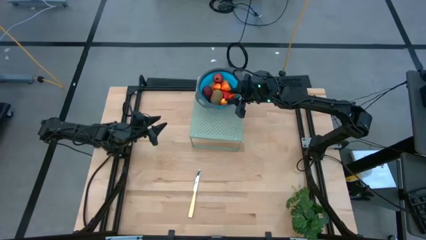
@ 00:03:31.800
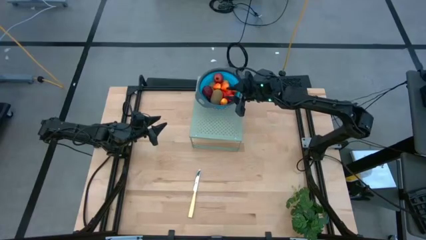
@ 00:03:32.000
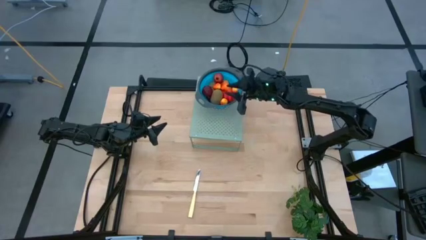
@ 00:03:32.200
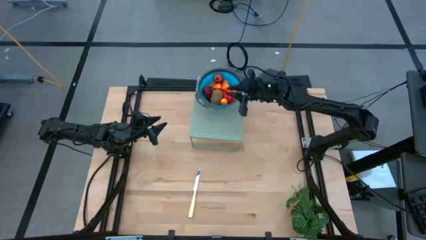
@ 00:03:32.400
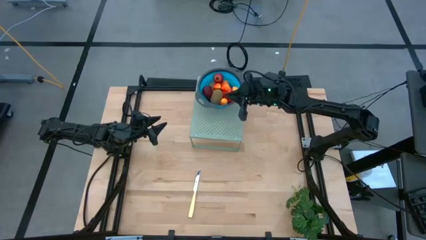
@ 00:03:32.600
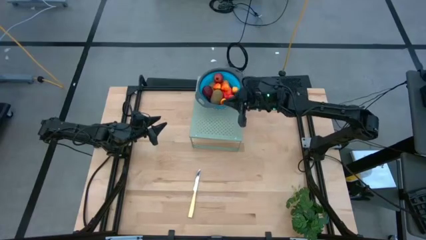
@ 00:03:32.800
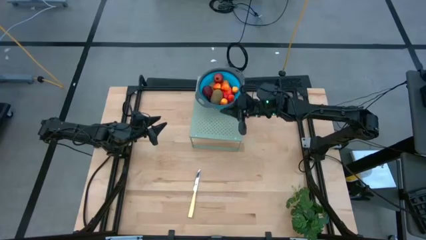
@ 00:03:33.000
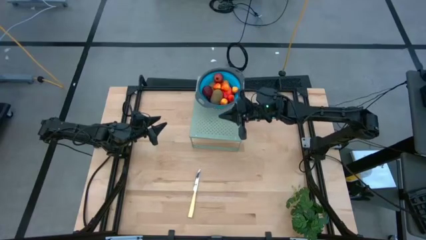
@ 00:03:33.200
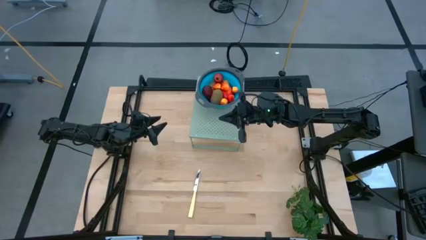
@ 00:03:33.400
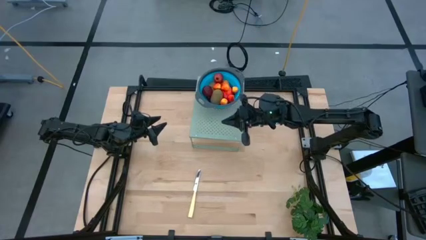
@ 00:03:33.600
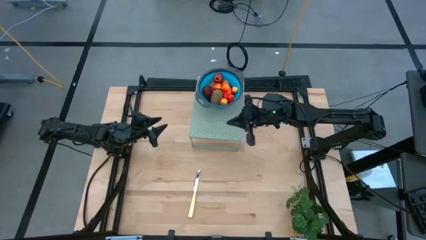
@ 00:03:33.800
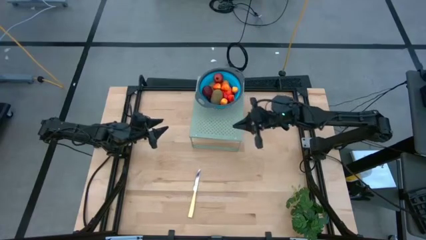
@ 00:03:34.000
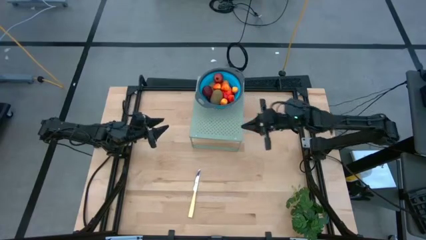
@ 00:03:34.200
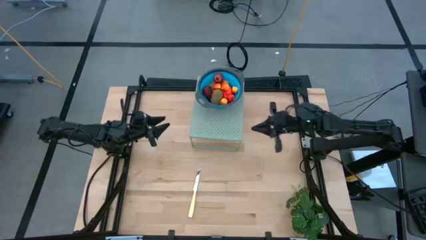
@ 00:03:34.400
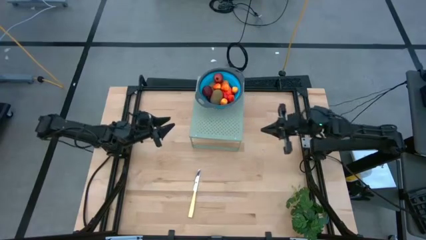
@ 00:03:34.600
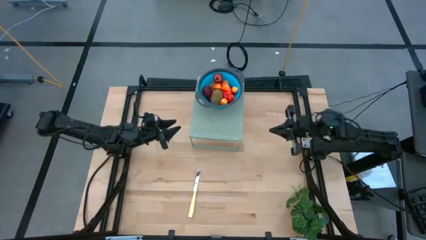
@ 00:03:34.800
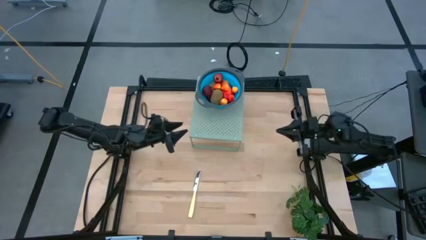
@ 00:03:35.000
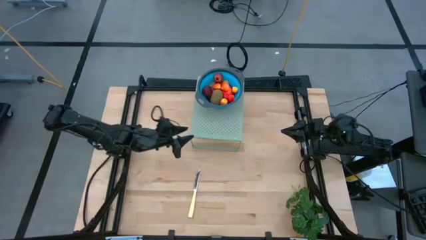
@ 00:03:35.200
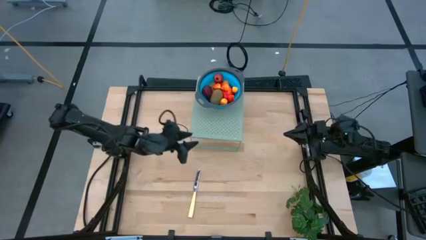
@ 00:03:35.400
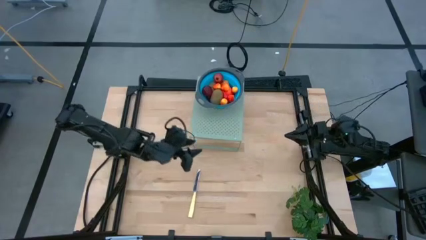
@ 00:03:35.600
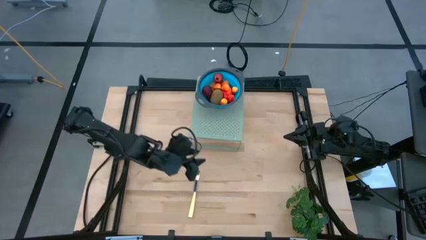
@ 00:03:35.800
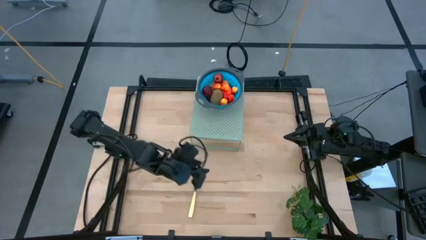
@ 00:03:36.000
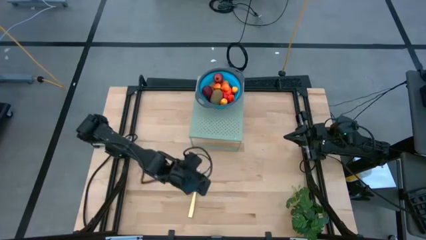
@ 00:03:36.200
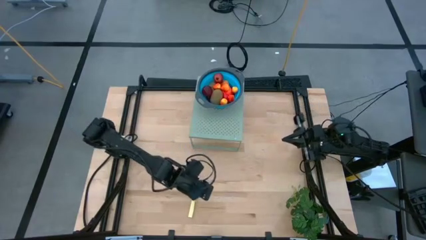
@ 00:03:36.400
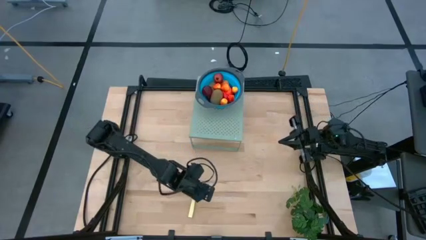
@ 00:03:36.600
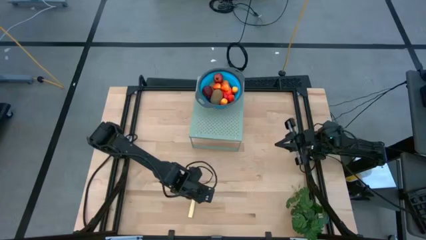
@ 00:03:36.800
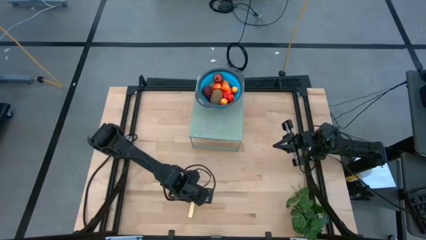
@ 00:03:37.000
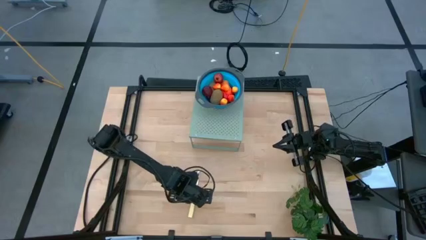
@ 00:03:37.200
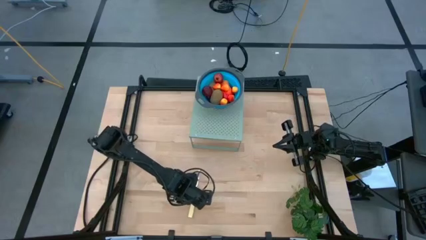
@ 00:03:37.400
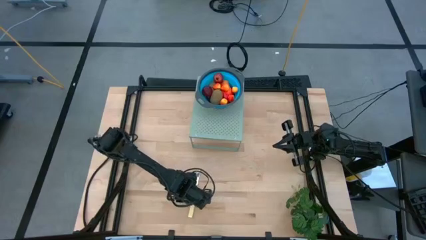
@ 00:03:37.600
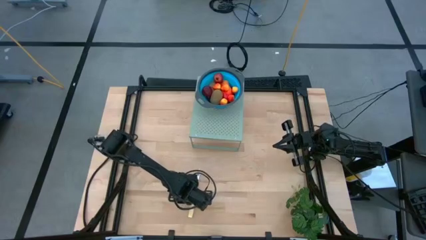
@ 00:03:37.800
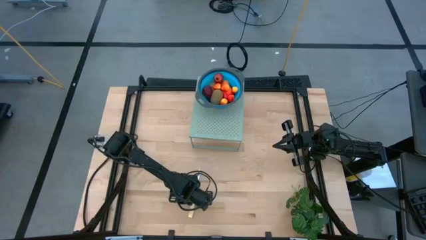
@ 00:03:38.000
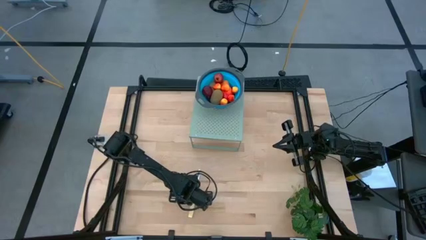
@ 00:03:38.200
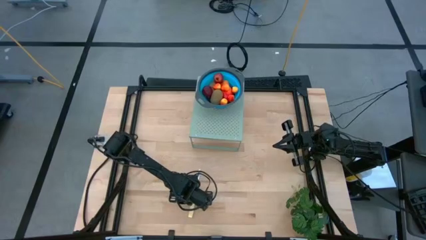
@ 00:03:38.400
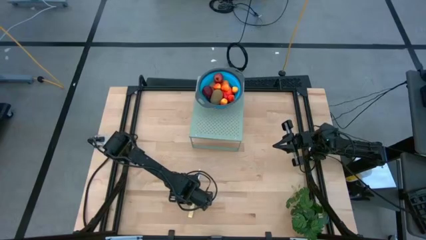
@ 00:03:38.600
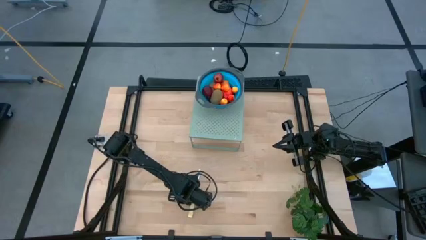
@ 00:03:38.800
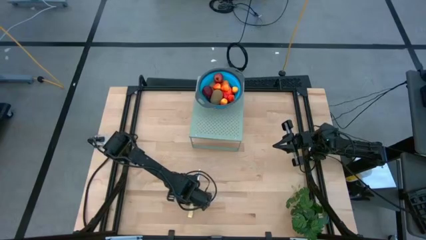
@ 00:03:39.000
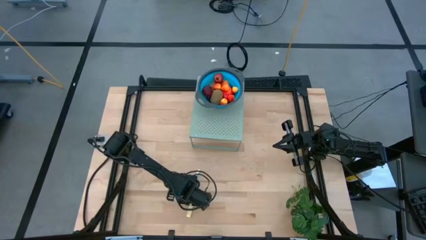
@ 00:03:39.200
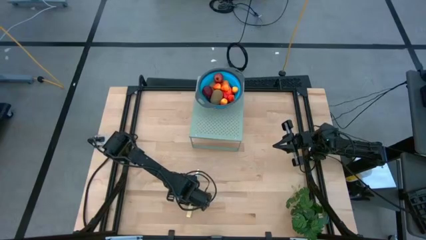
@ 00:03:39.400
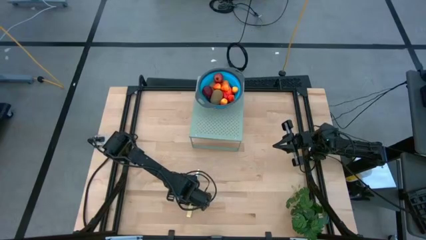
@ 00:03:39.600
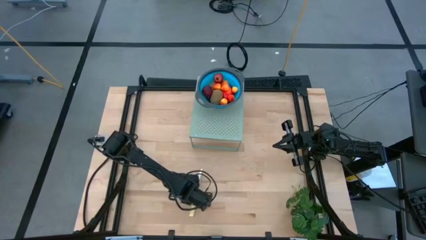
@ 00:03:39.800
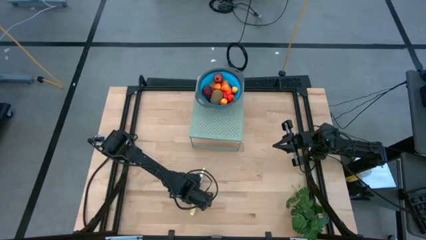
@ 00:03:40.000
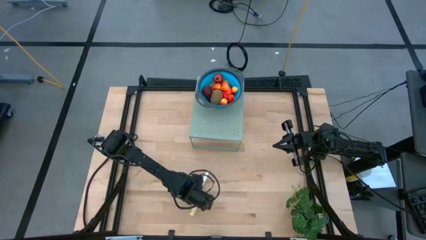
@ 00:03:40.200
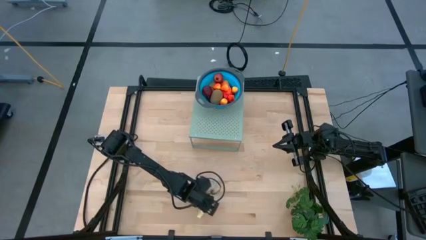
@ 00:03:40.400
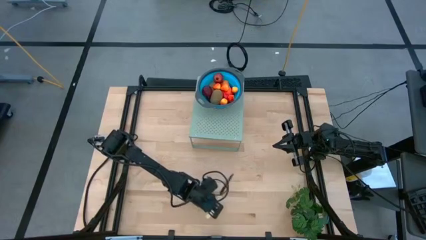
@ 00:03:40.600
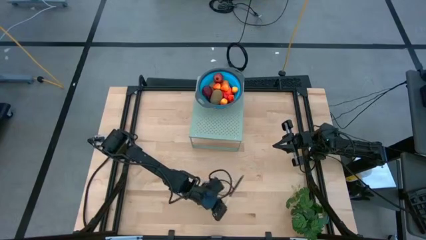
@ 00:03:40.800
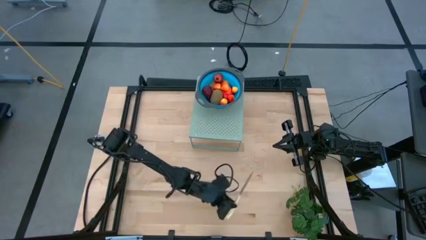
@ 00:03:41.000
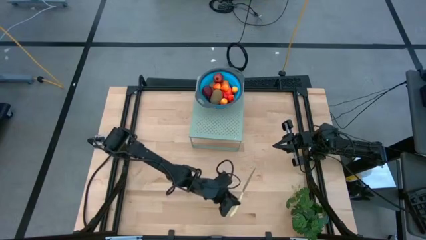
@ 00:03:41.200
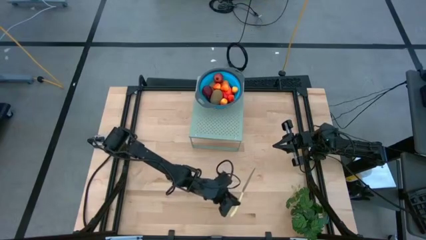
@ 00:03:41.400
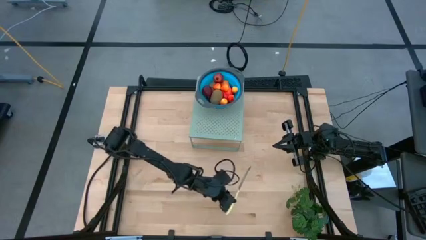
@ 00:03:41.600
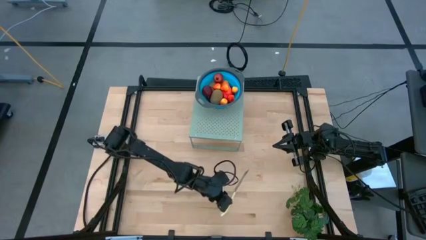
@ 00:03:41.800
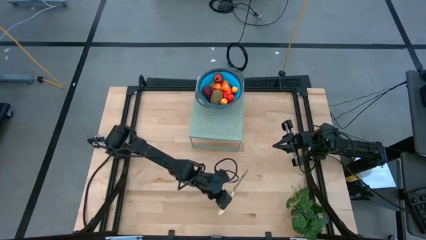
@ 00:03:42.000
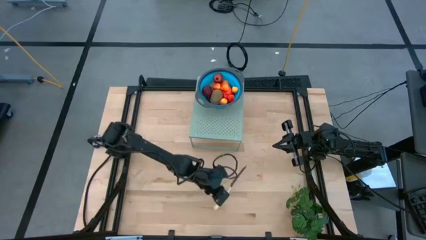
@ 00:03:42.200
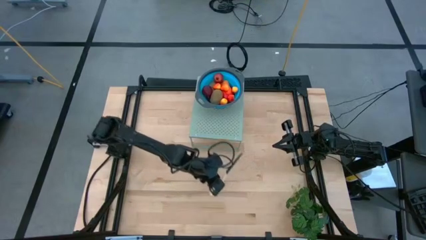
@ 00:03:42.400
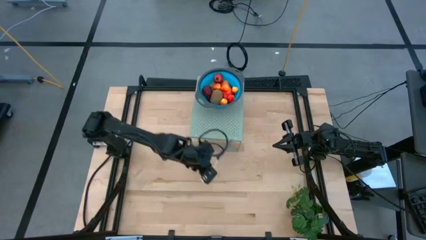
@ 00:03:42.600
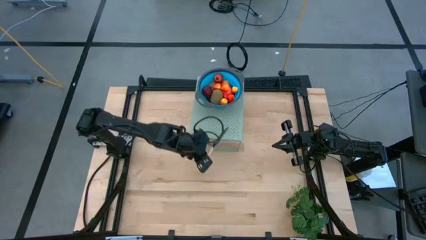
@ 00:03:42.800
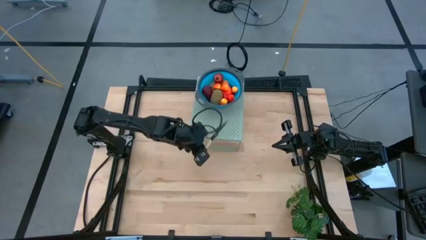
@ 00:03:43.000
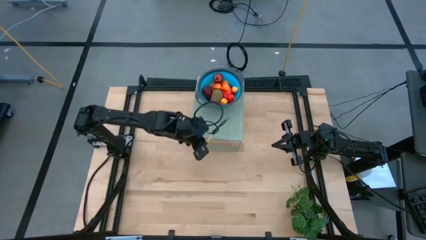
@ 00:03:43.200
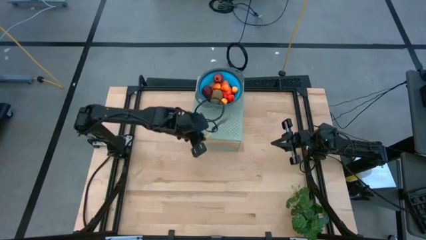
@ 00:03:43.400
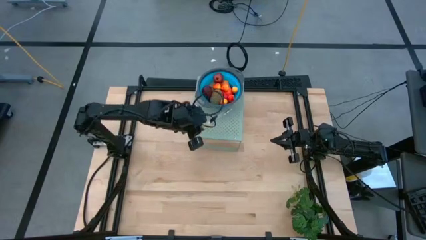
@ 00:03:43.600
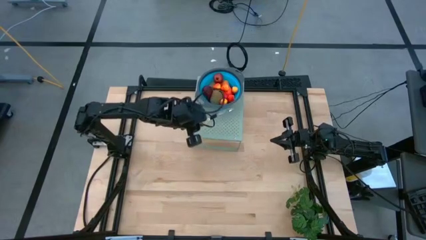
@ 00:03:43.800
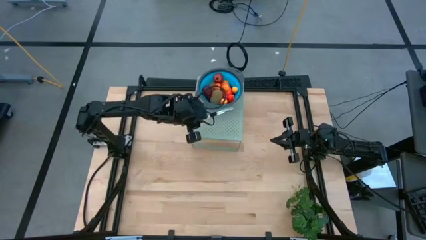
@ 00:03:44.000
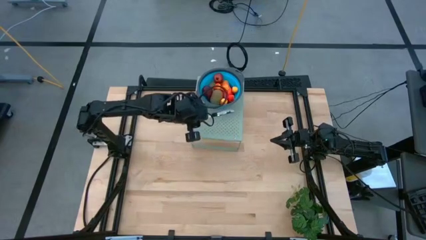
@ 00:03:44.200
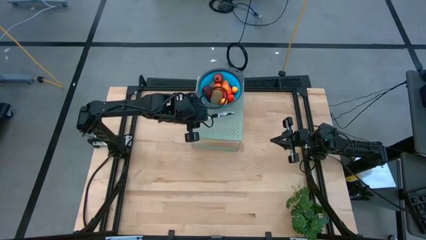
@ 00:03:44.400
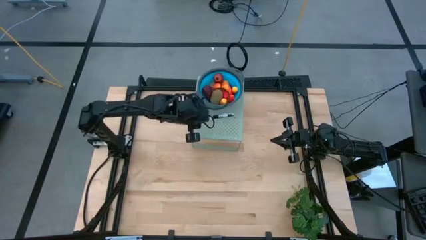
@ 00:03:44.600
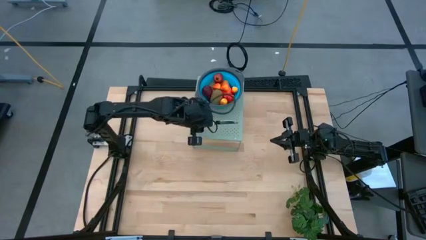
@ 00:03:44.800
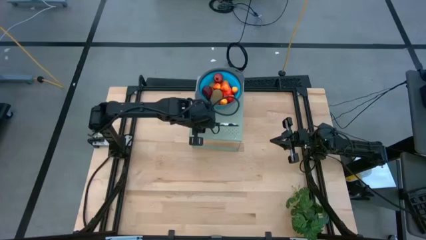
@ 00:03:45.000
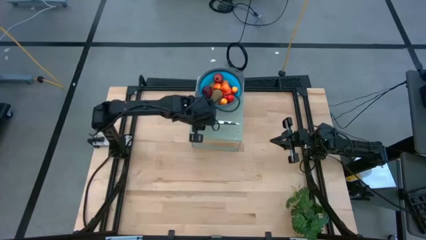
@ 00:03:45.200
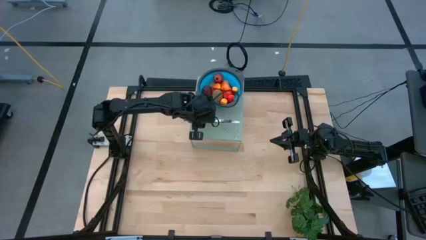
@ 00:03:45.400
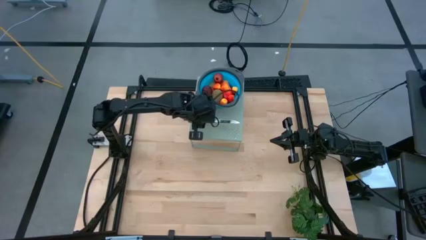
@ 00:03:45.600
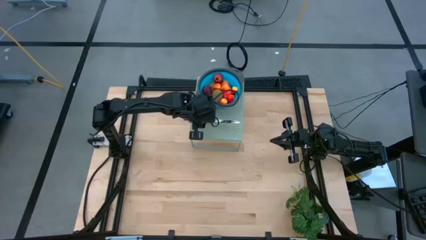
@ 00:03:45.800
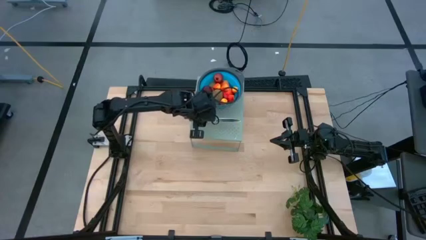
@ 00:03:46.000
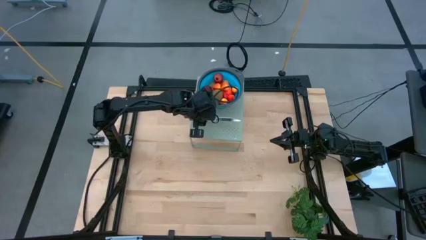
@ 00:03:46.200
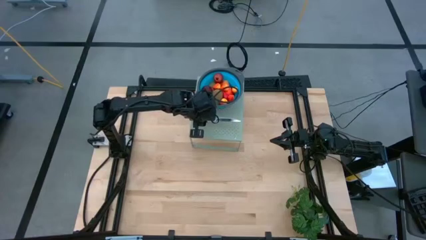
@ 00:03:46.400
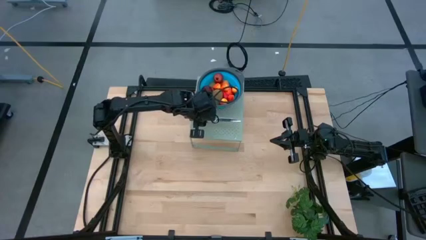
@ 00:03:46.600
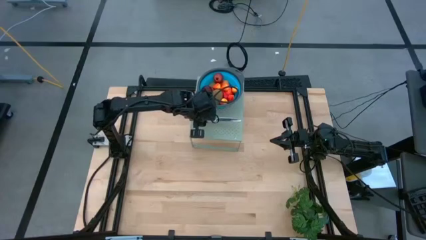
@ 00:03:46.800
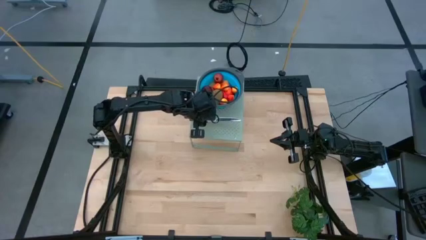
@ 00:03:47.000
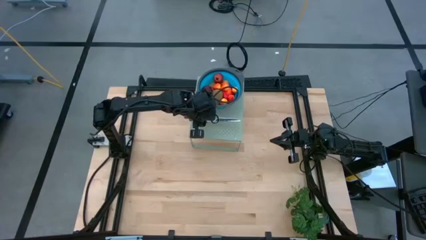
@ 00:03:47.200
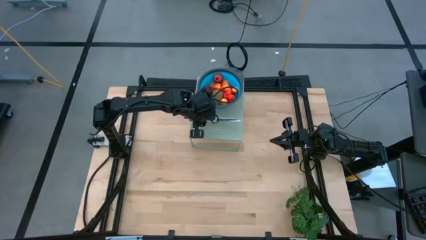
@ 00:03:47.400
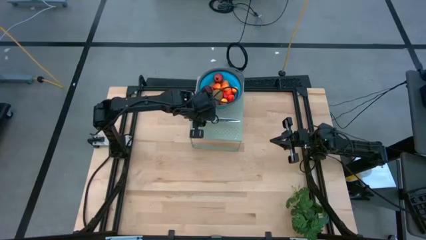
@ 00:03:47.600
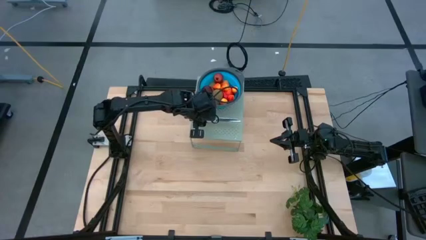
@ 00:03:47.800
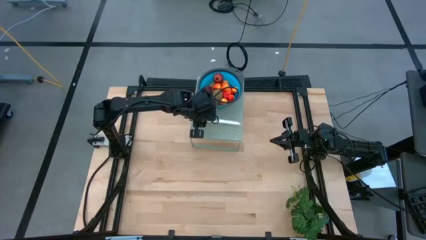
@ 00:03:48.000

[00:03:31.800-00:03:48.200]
Task: Pick & Place Fruit
Put the yellow knife on the shelf
